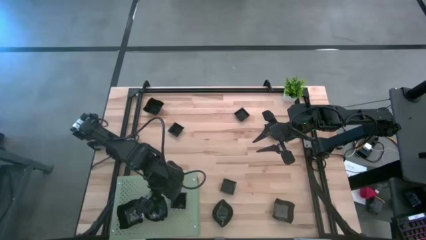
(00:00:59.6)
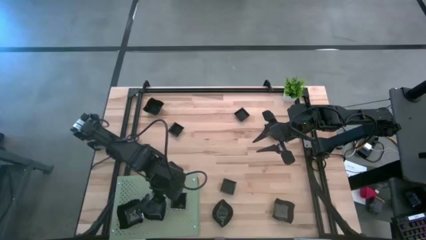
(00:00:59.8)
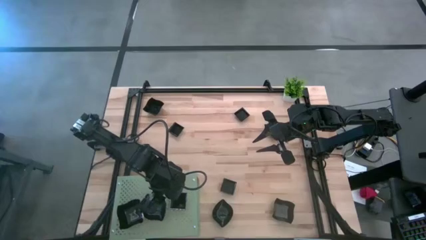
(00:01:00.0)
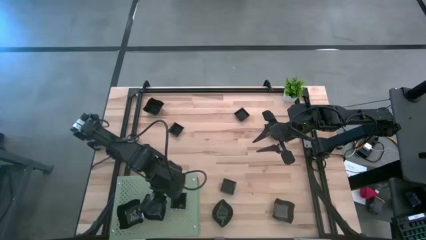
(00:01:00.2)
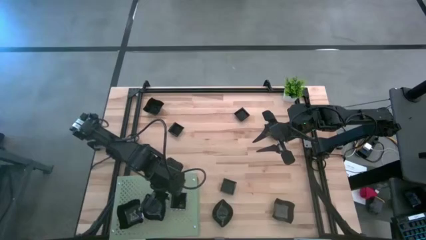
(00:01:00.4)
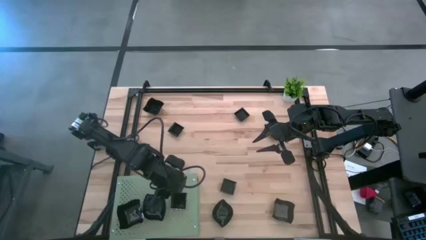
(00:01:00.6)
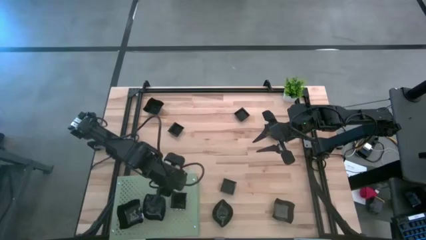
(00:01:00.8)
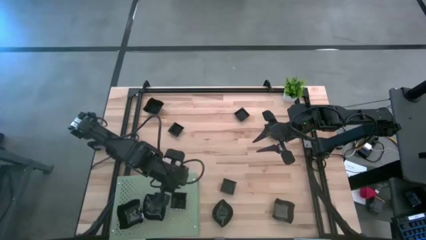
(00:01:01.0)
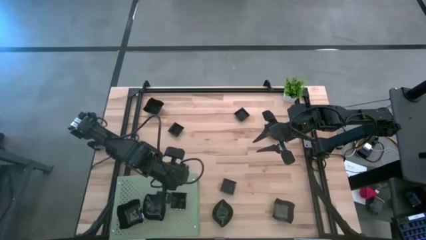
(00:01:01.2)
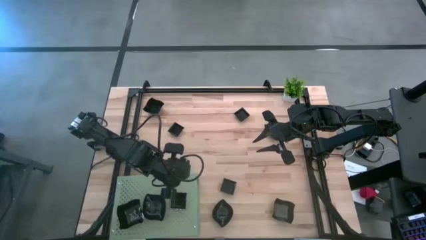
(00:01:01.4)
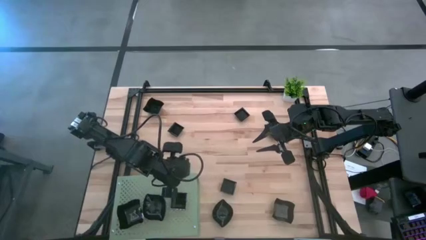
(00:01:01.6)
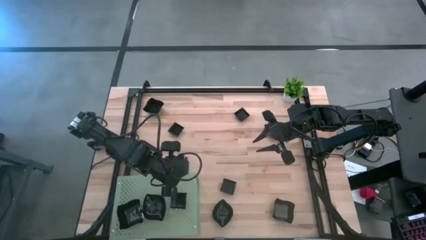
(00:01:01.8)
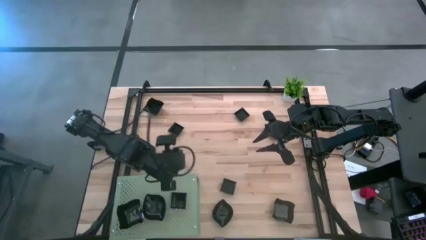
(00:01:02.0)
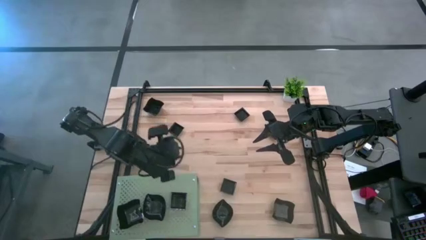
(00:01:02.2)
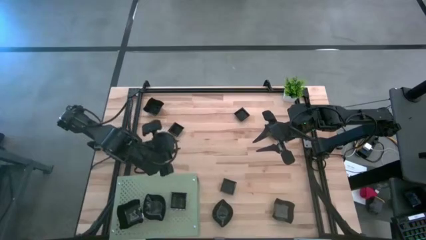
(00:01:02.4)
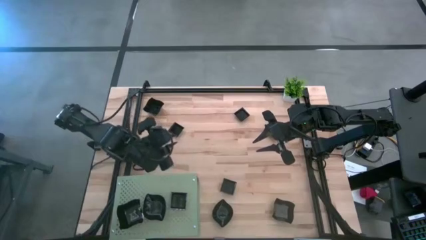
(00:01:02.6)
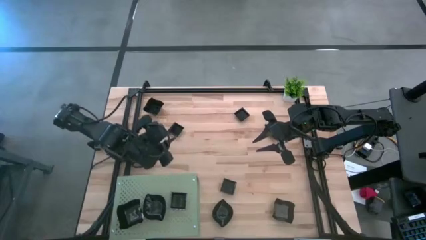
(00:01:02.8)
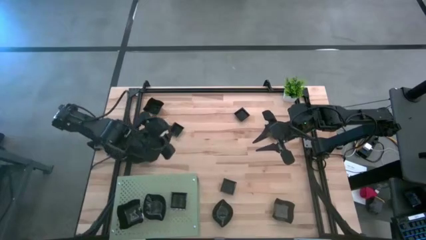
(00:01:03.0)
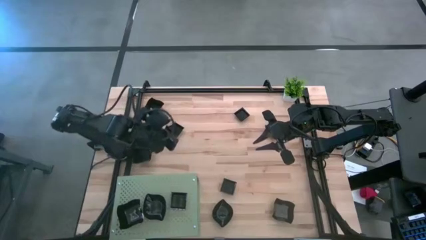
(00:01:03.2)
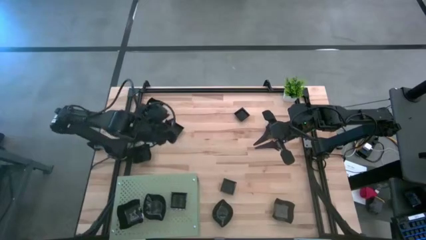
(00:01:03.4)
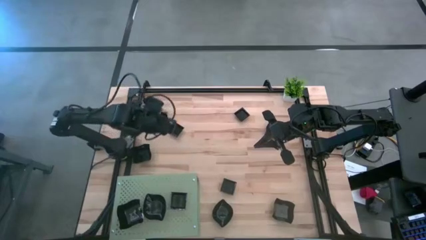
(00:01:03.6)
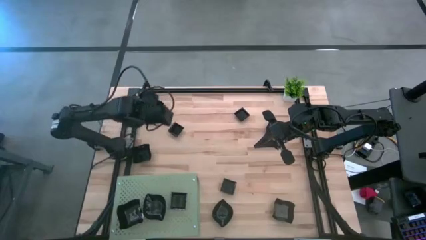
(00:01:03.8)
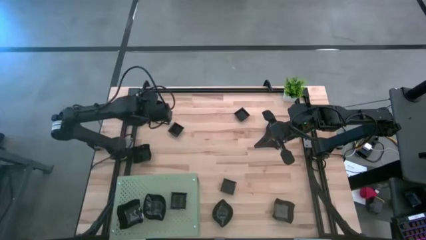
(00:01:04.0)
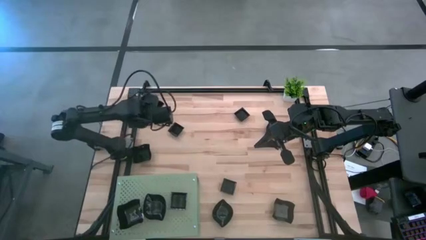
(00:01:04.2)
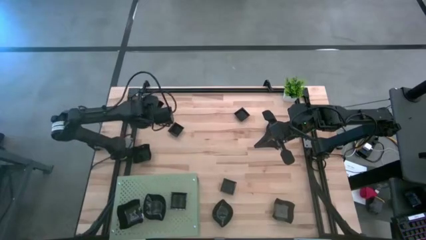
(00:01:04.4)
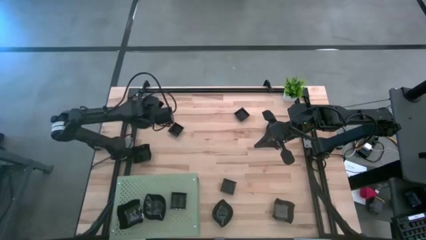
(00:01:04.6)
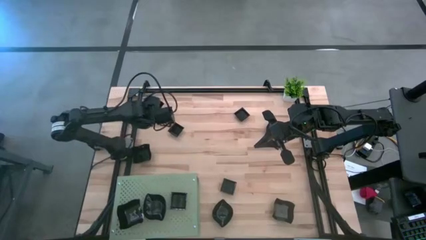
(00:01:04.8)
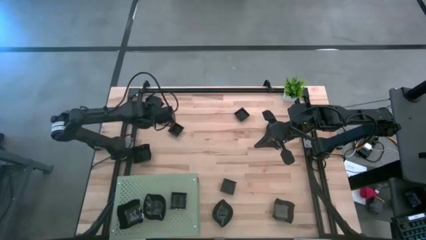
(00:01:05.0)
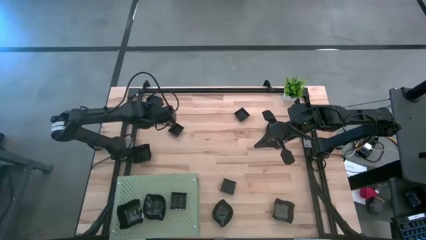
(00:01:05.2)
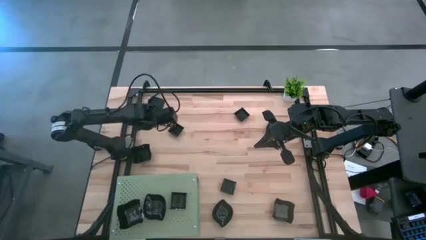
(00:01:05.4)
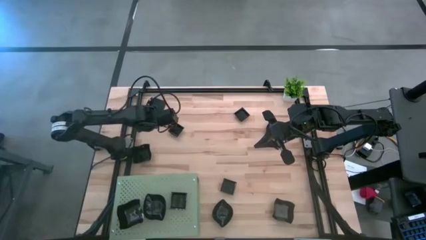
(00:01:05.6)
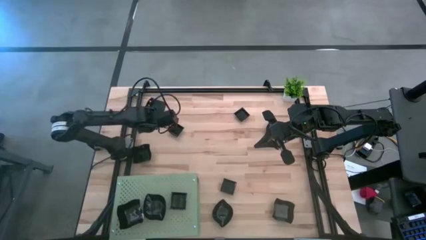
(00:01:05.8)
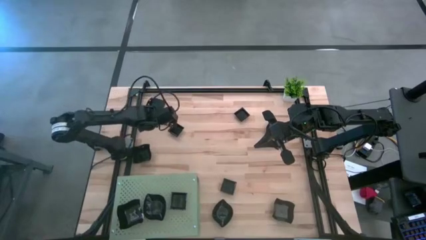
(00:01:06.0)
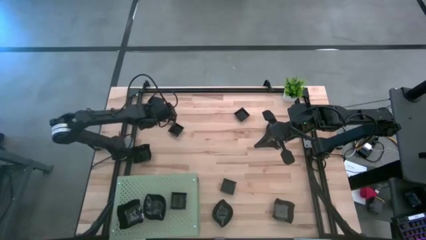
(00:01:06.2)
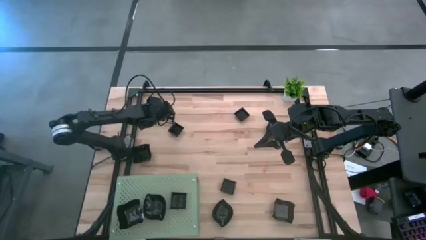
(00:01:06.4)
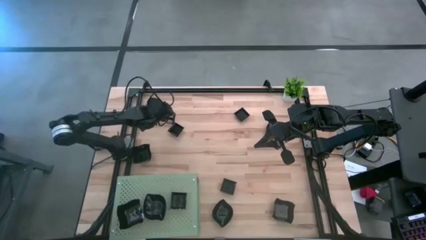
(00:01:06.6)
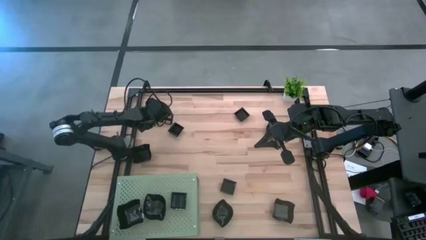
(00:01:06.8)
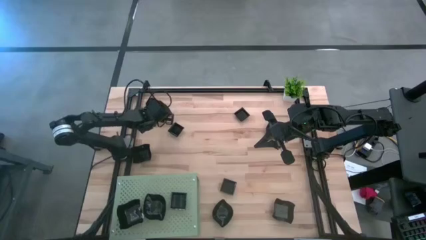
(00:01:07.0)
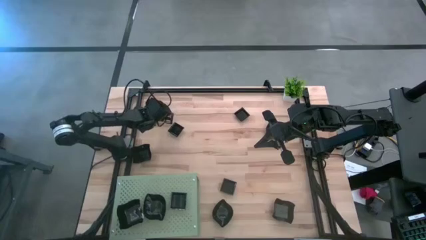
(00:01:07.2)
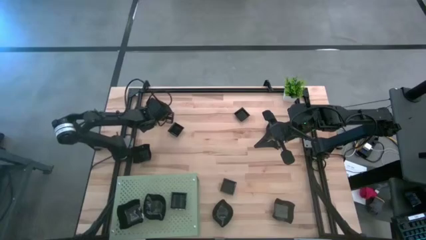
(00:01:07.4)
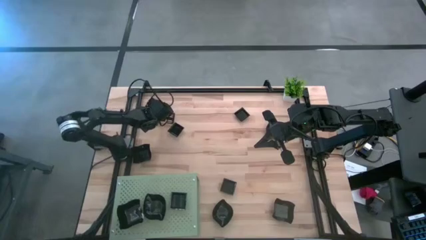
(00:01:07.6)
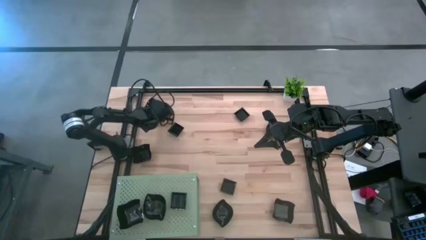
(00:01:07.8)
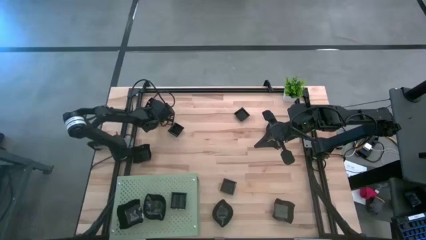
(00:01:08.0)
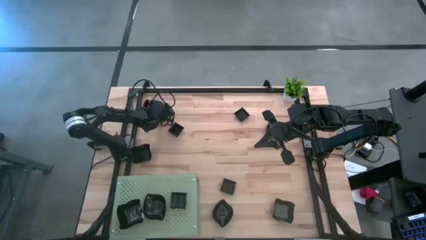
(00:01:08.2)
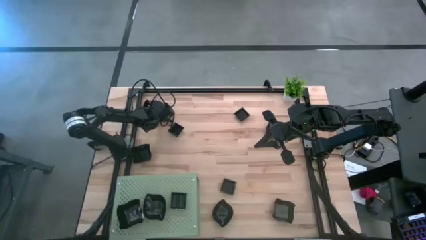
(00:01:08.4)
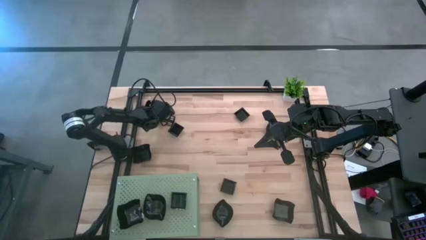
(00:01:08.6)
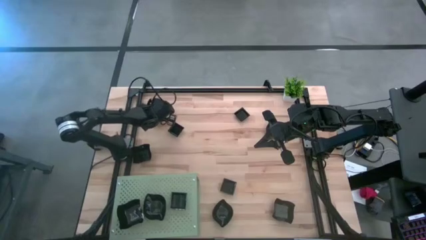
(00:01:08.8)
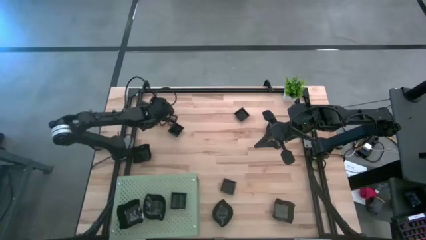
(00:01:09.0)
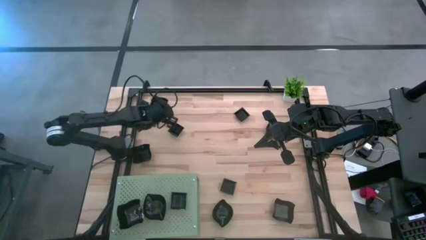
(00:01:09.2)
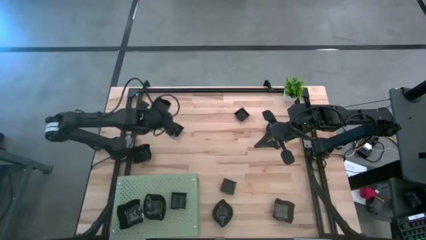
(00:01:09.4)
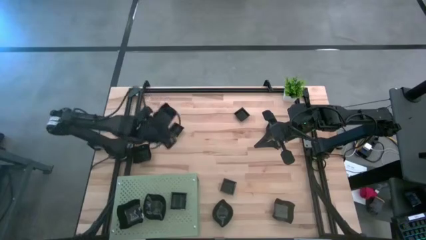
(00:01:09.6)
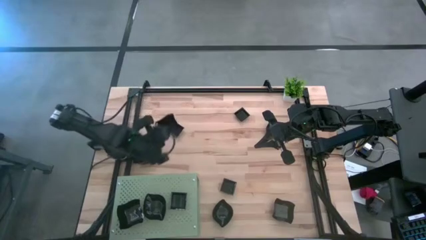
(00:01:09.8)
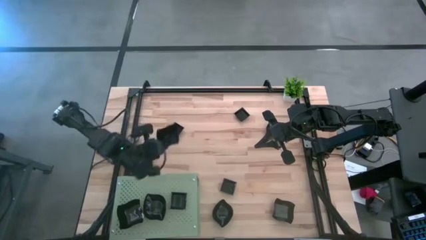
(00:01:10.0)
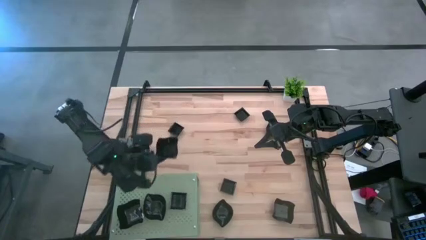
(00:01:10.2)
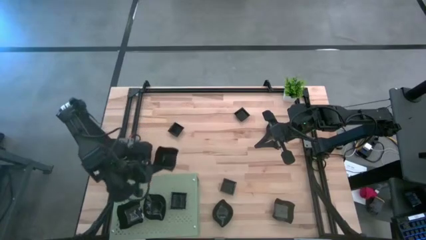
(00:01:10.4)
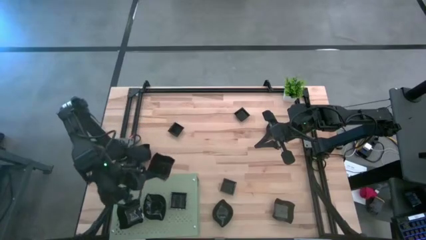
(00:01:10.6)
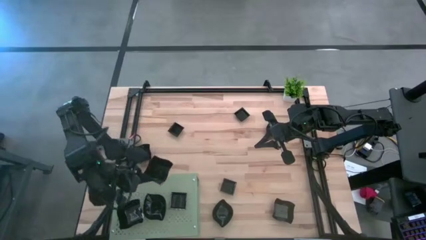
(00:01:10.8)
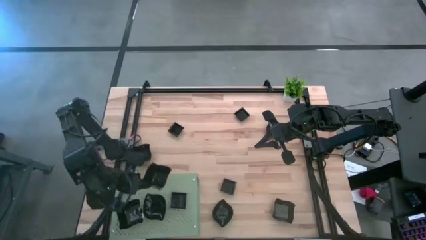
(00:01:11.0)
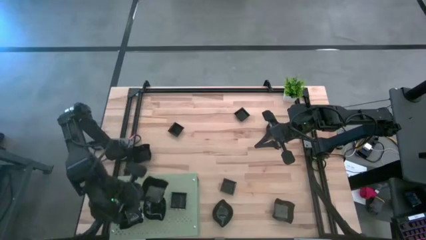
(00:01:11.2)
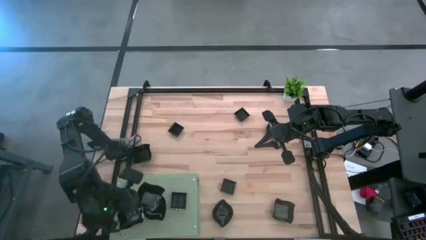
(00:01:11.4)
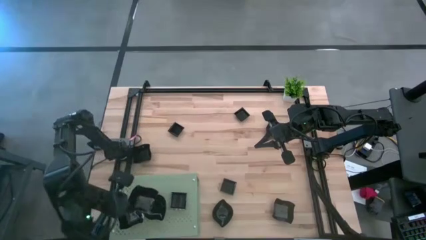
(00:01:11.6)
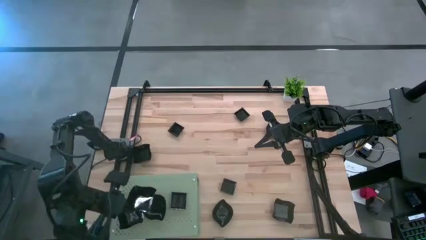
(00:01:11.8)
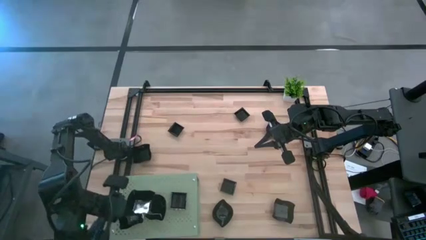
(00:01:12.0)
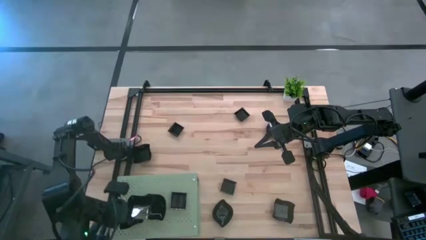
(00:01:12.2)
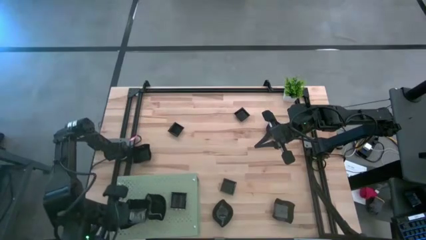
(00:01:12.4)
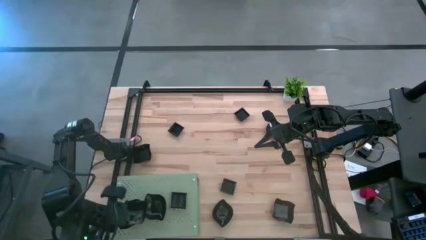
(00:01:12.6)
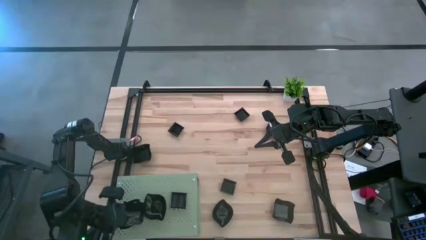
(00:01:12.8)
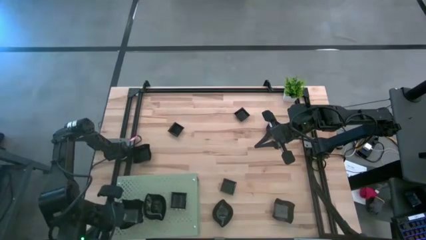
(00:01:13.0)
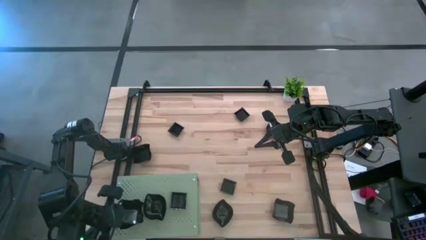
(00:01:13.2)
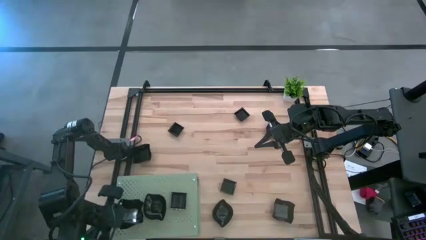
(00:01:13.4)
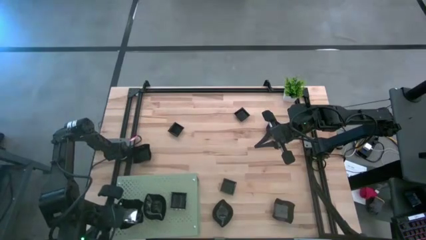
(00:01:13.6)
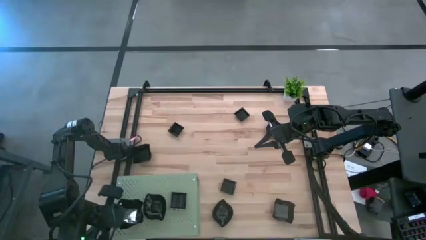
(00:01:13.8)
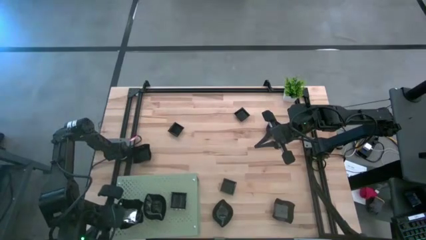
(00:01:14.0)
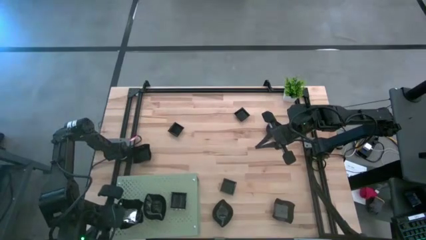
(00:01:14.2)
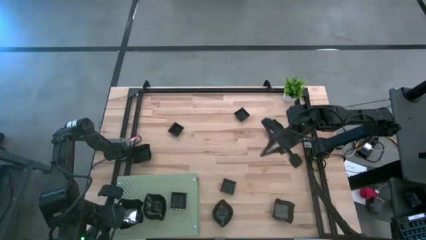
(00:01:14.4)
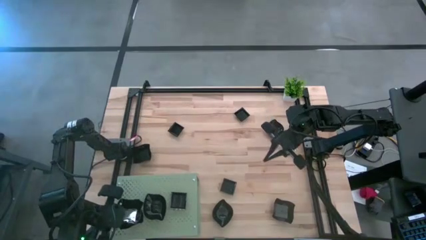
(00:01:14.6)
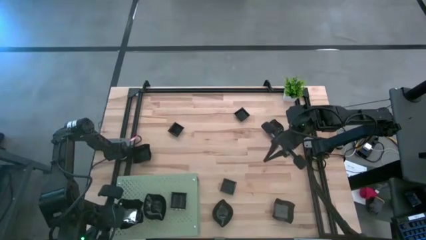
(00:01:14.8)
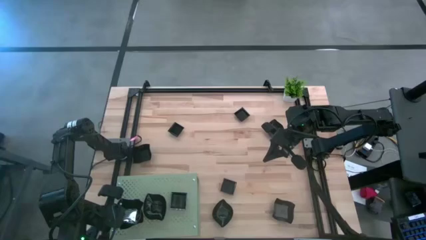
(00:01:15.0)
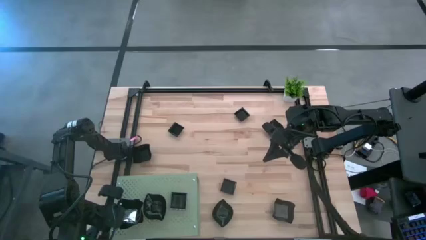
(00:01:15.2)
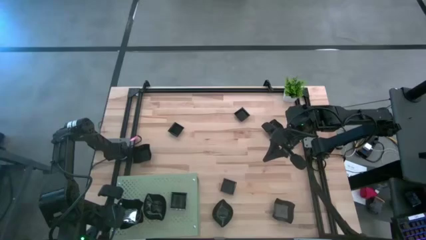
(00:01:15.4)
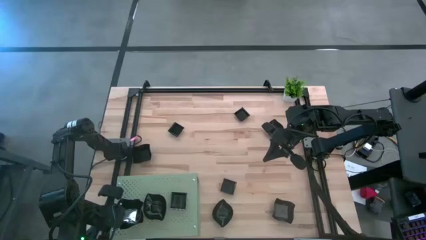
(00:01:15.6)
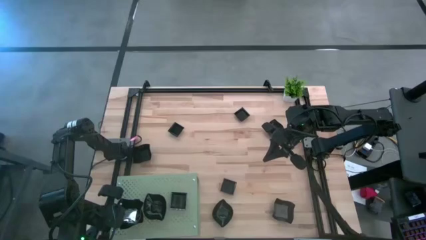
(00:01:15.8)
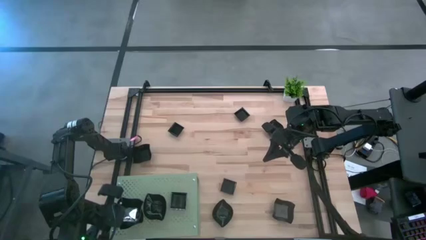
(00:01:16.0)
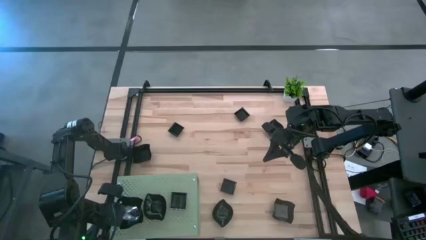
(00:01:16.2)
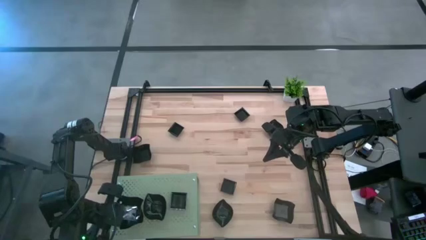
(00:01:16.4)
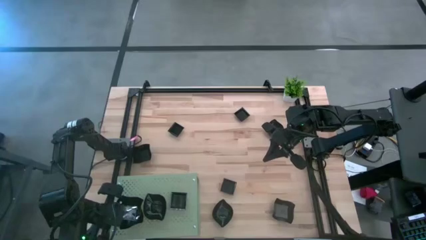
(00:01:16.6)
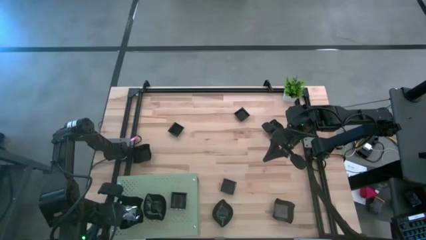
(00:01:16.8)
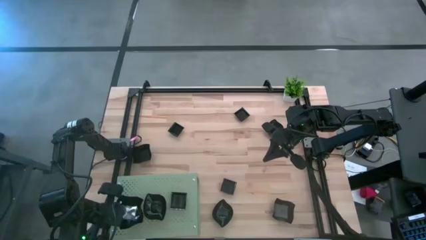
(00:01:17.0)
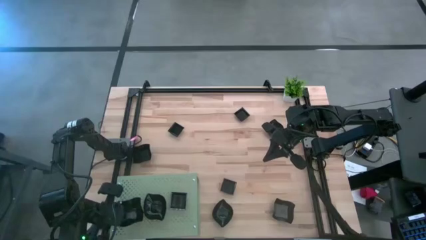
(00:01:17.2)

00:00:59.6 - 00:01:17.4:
Task: Pick & Place Mini shaped plates
Stack the black distorted square plate on top of the other black distorted square plate on the shelf
